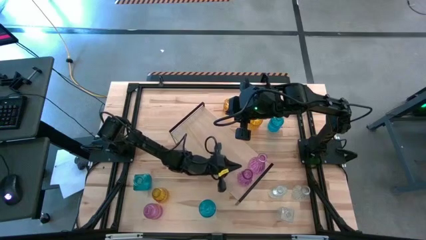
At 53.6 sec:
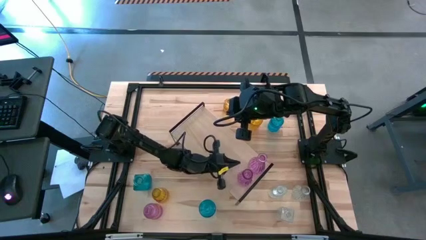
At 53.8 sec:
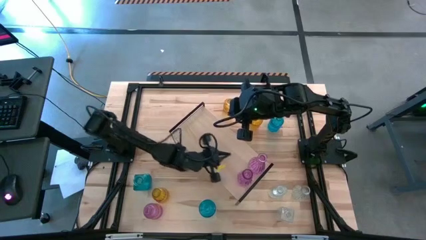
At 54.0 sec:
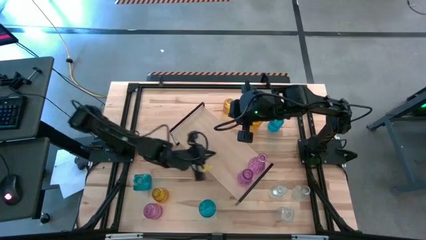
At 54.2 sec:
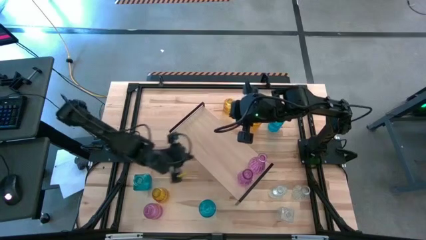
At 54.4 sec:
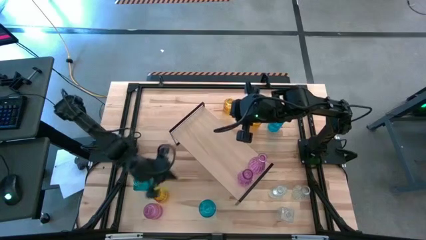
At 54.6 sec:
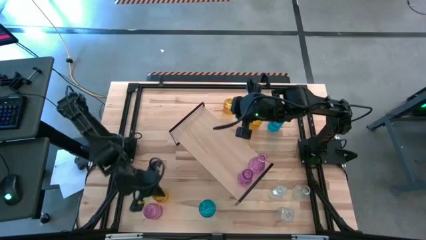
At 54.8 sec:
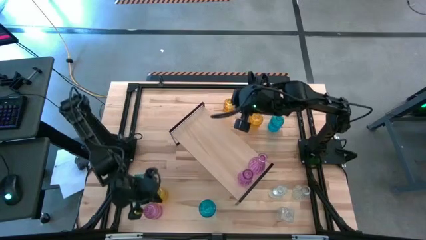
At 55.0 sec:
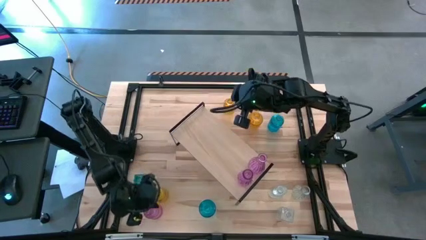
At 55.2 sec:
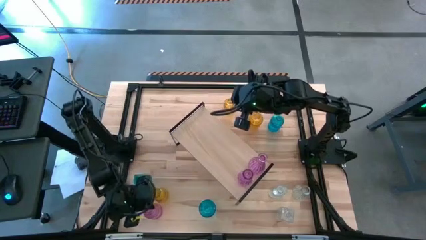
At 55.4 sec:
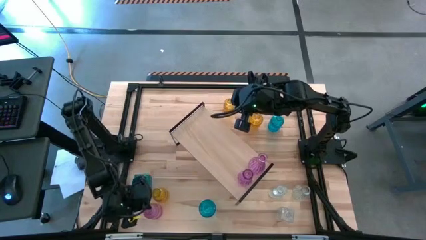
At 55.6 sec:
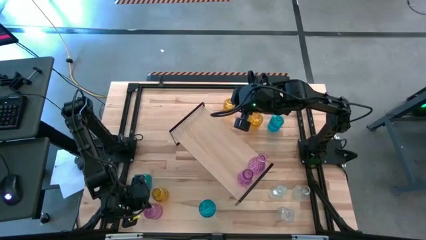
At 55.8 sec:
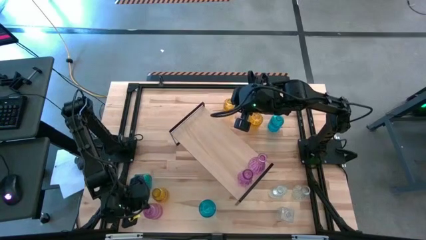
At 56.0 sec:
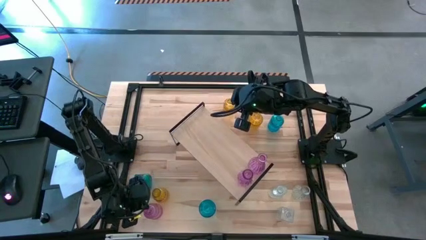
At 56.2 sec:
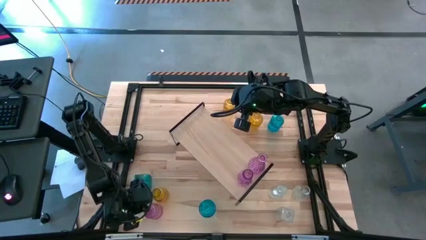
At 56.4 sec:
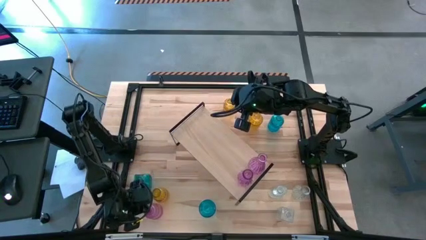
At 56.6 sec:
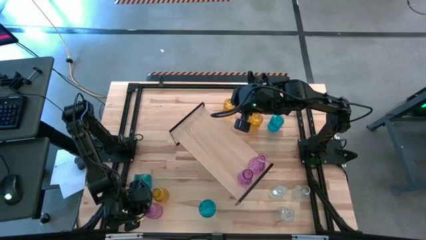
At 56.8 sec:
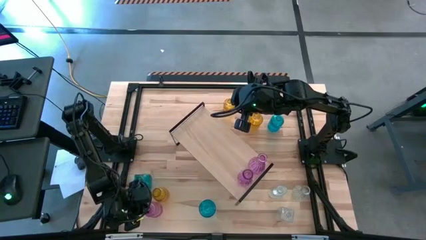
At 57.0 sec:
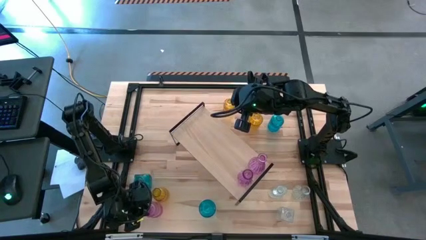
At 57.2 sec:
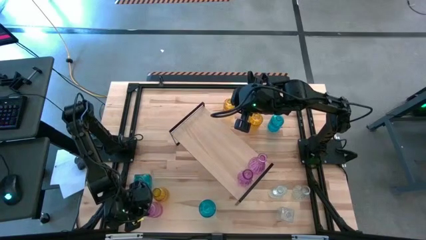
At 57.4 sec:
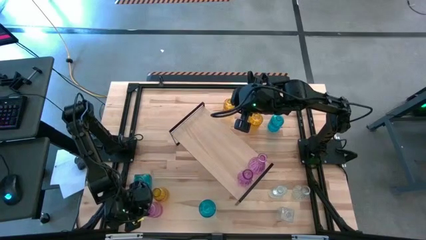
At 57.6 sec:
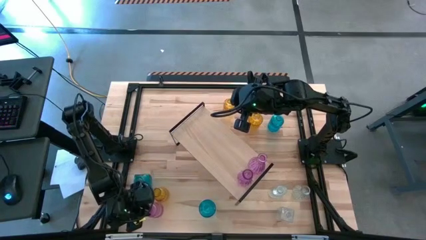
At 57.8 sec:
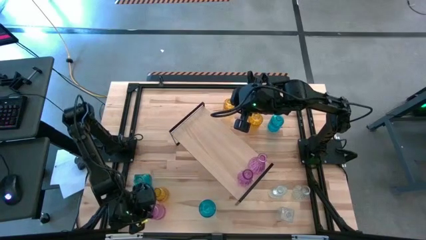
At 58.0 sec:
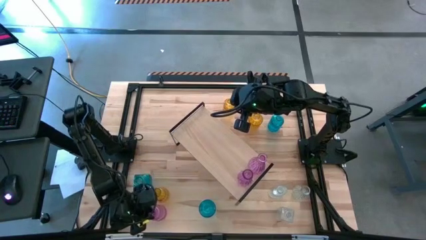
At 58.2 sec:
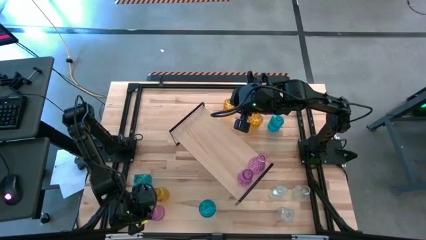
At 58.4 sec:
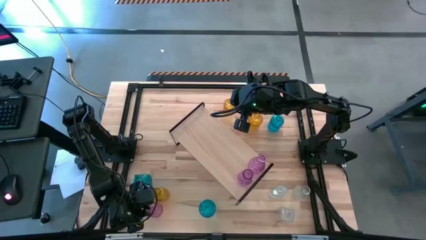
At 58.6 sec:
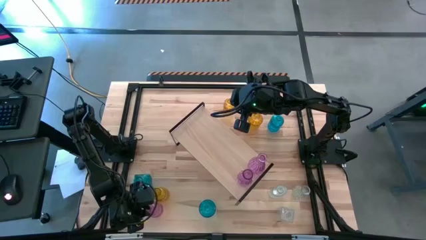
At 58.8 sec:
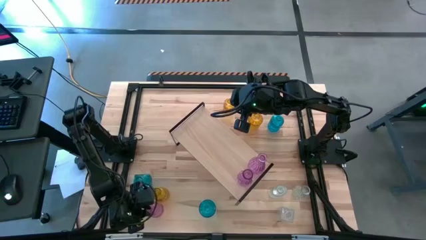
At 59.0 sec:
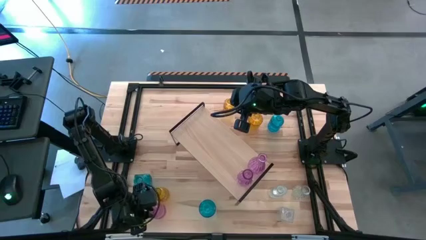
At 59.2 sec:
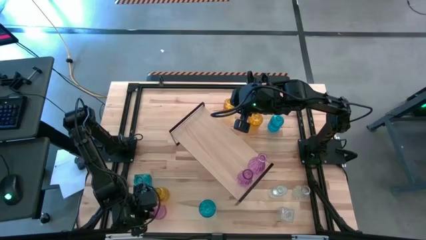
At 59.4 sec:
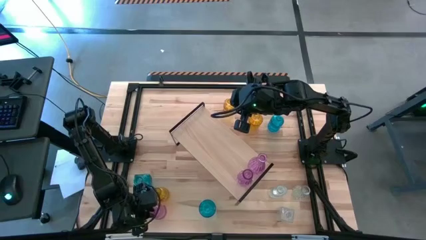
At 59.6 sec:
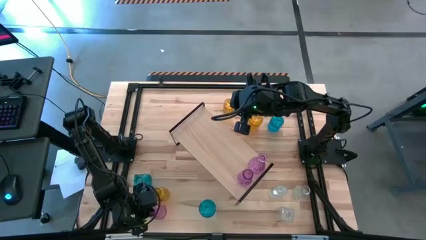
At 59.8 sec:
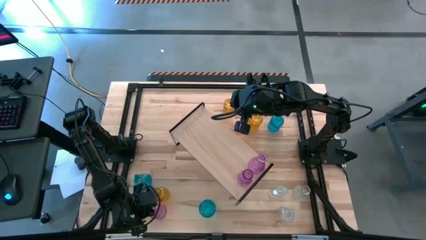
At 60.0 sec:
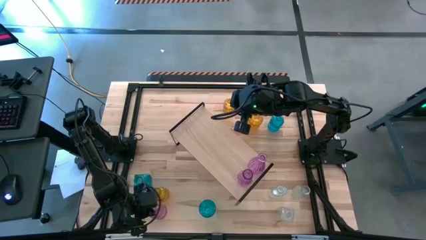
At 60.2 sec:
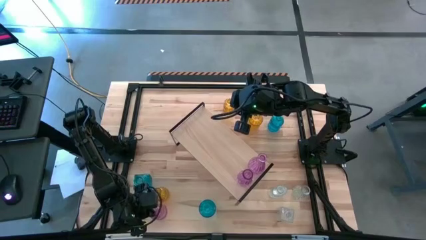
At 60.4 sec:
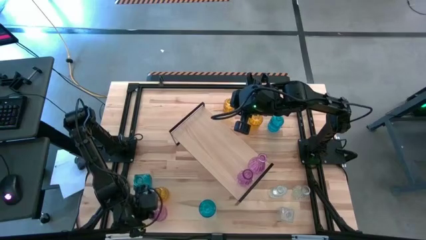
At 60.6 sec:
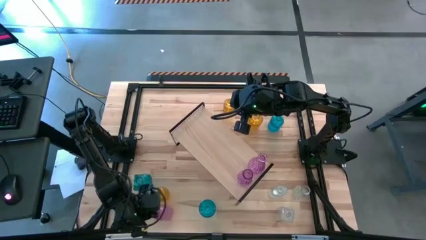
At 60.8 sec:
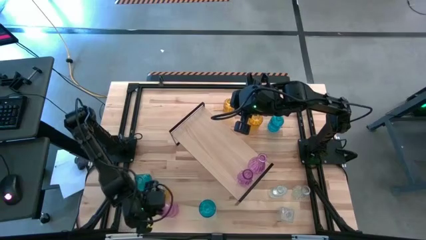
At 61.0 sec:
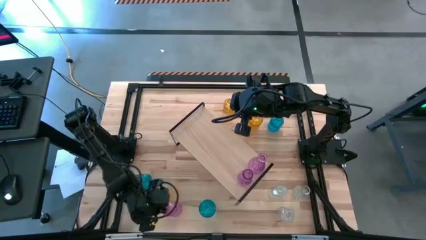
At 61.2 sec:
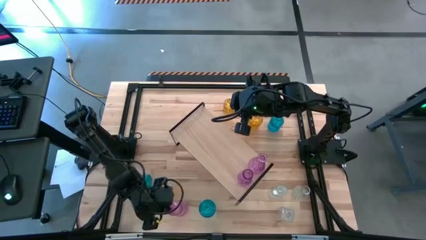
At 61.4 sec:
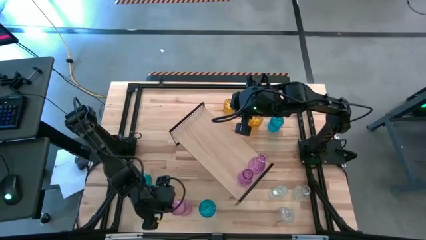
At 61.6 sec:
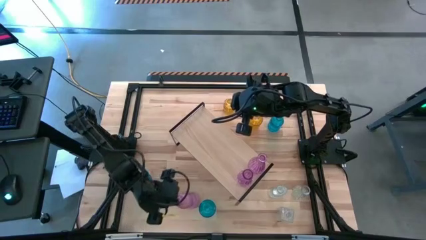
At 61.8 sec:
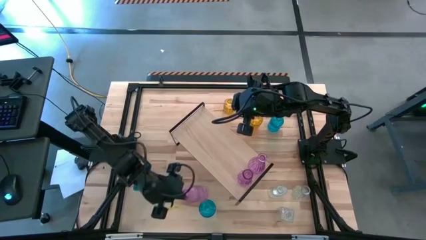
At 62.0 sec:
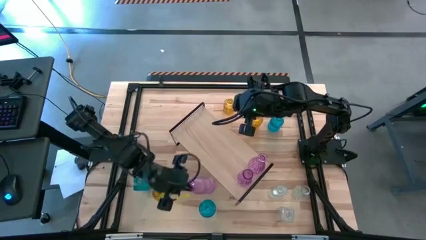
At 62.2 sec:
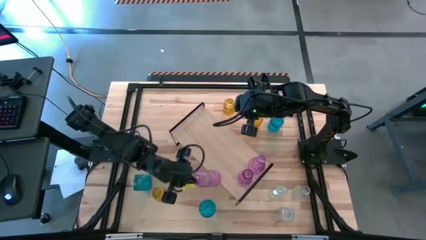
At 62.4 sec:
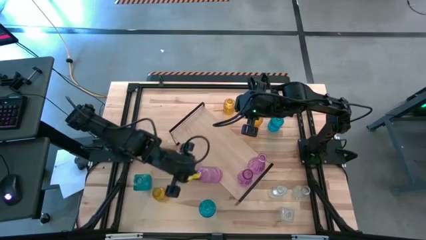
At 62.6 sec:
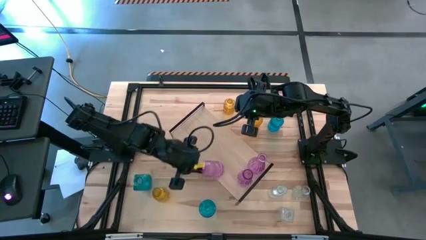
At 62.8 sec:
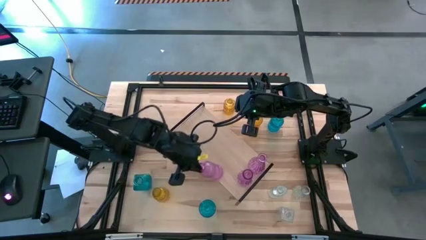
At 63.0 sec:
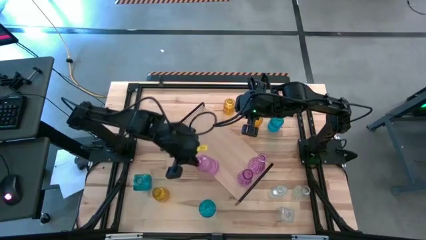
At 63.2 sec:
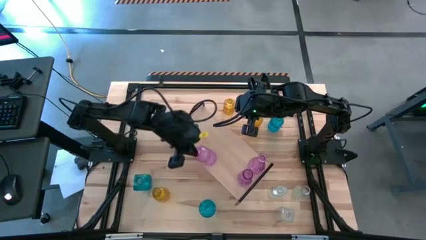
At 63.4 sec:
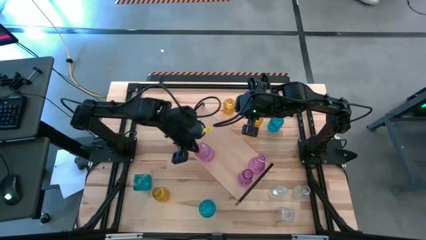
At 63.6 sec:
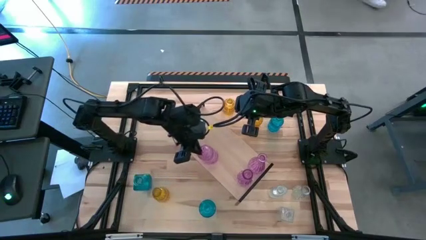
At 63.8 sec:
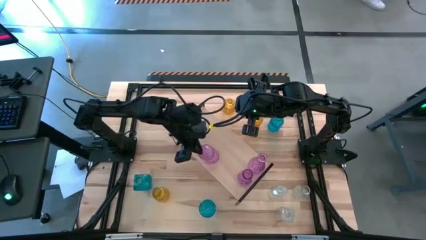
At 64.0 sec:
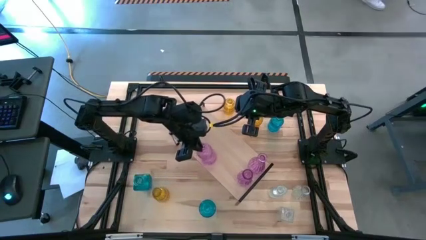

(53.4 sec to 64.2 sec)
Task: sort vases onto shelf
Put the pink flower vase on the shelf aligned with the other pink flower vases

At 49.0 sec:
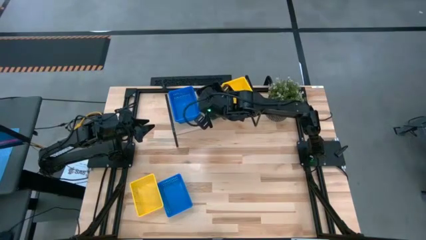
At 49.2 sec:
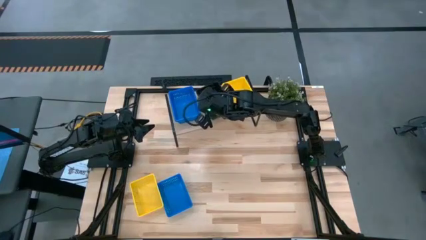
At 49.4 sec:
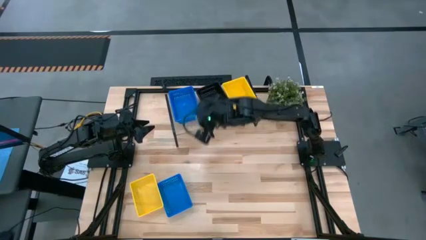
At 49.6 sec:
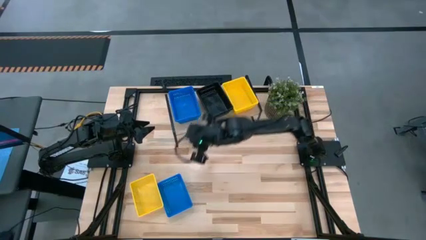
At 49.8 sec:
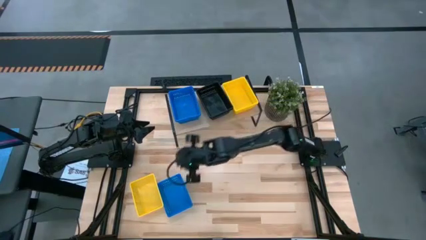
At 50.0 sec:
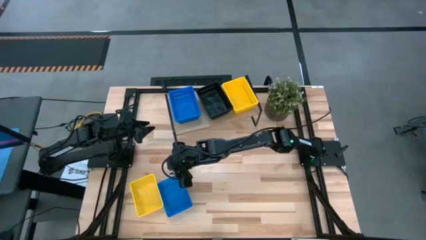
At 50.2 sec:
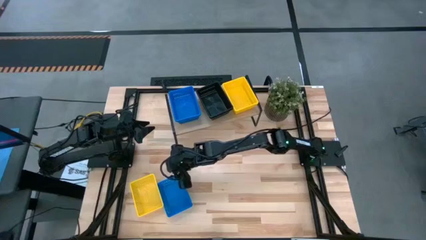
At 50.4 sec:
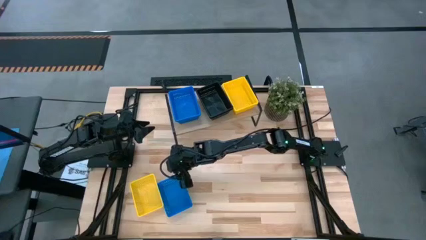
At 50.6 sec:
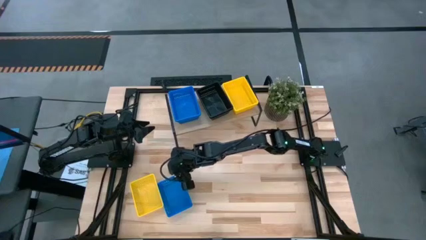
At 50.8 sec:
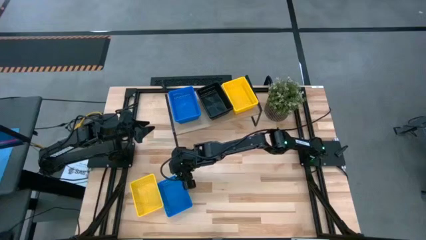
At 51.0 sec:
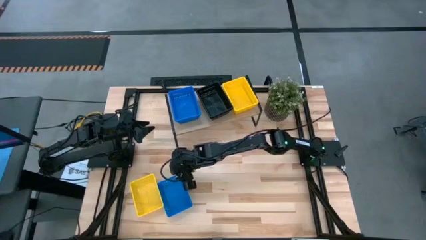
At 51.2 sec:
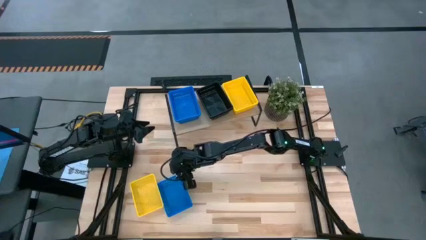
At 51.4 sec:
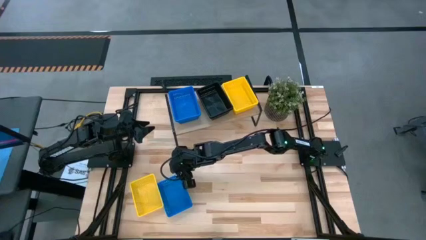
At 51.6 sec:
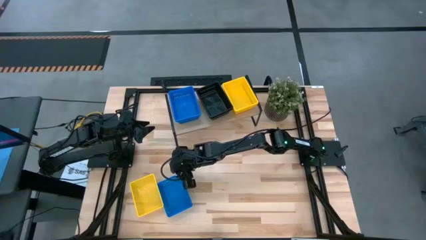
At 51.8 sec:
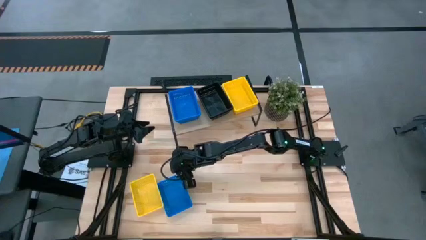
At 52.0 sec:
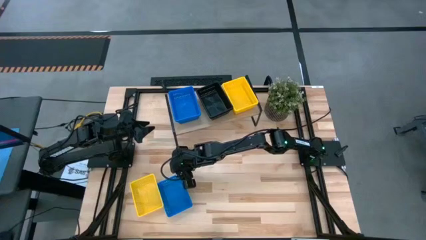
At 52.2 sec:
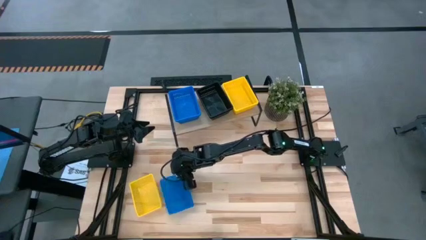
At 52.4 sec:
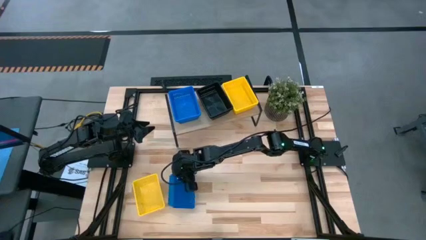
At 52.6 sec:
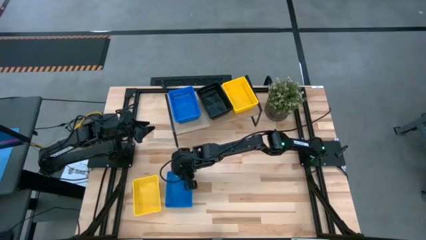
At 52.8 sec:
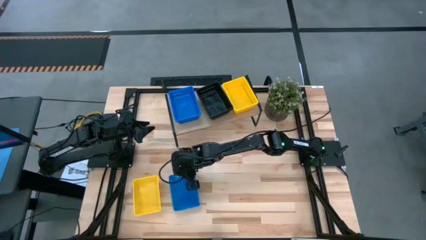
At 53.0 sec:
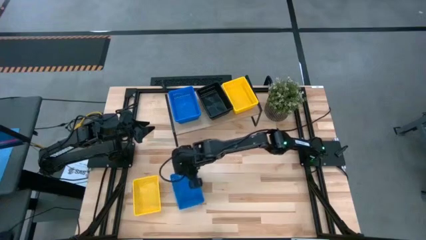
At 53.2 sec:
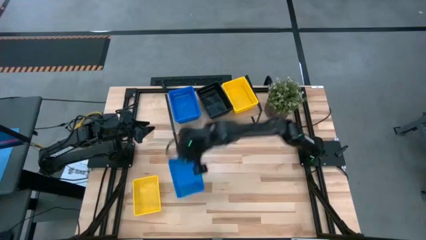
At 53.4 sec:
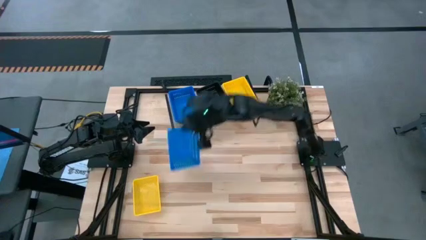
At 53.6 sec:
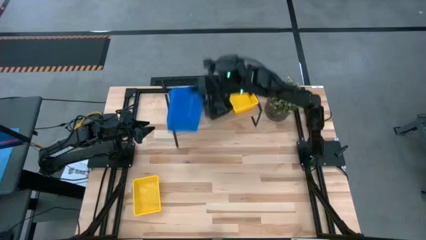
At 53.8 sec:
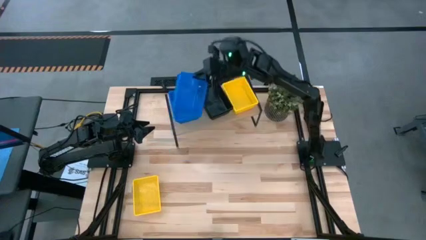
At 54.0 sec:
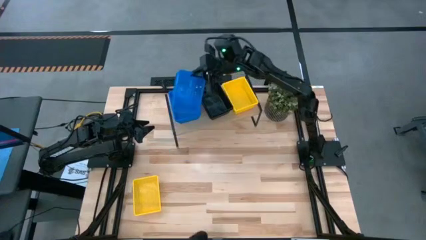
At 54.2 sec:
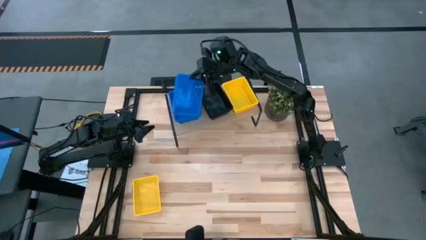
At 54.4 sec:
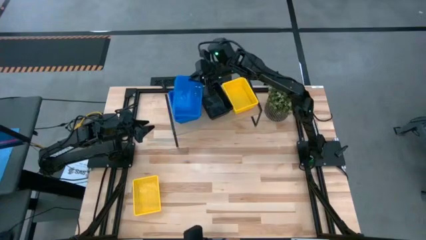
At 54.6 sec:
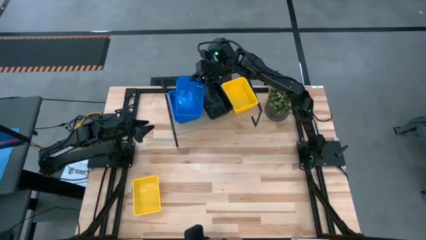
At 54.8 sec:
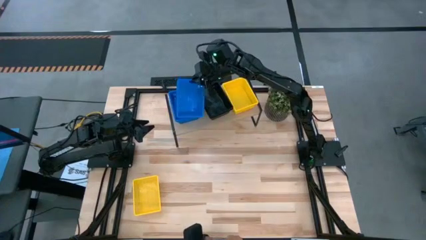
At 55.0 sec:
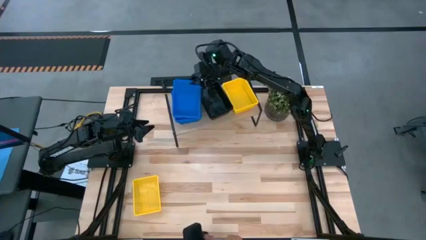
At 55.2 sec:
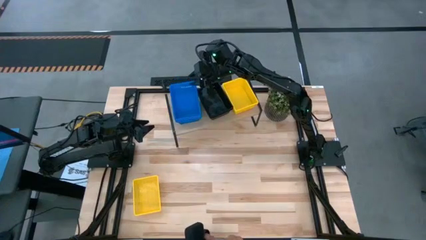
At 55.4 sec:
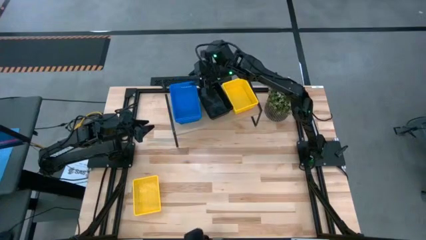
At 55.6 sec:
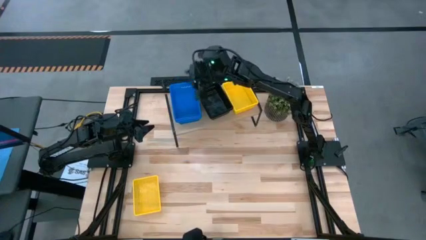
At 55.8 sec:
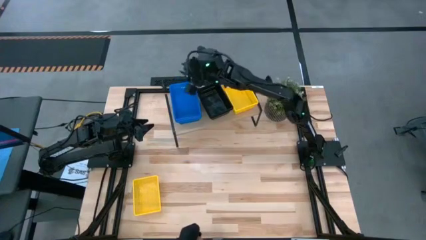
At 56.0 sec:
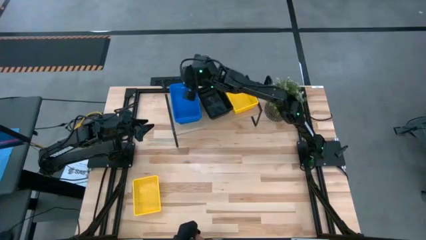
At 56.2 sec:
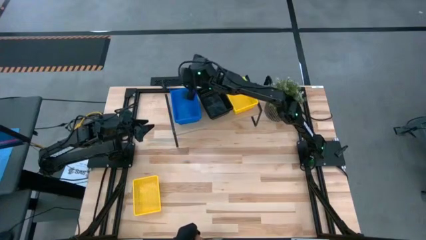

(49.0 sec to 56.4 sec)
Task: Stack baskets on shelf by color
Stack the blue bin on the blue bins on the shelf
